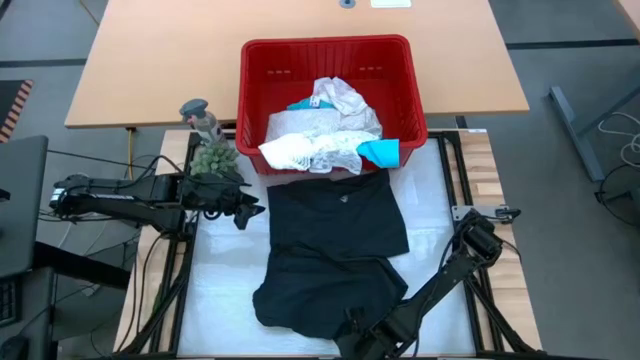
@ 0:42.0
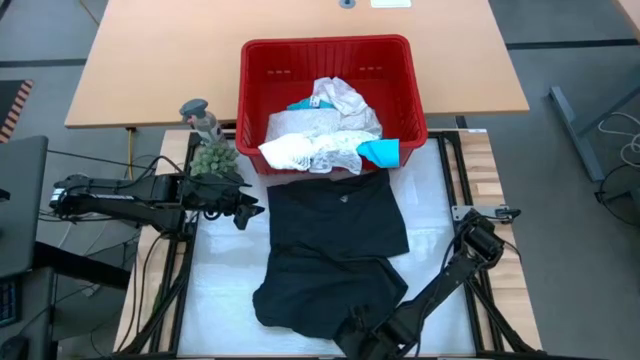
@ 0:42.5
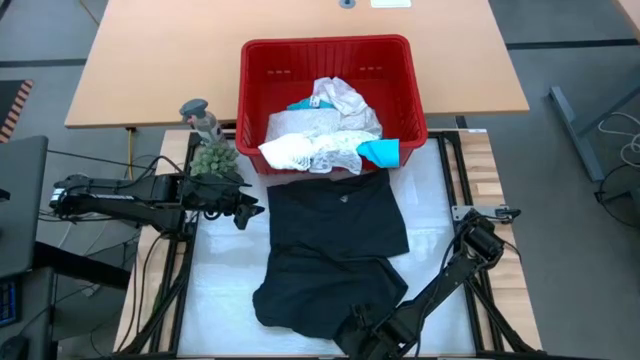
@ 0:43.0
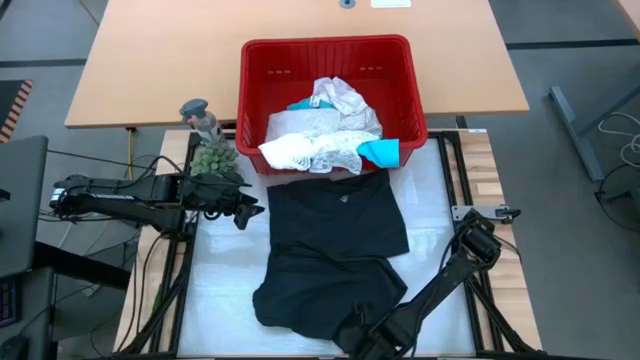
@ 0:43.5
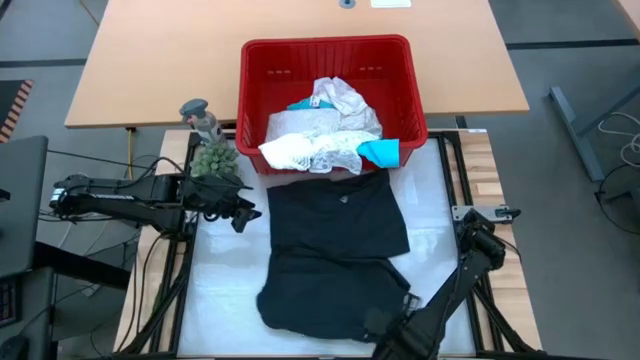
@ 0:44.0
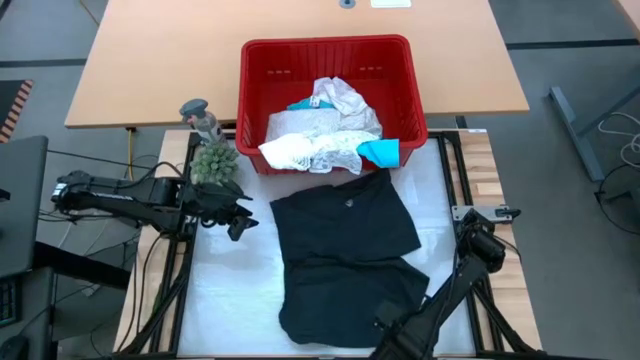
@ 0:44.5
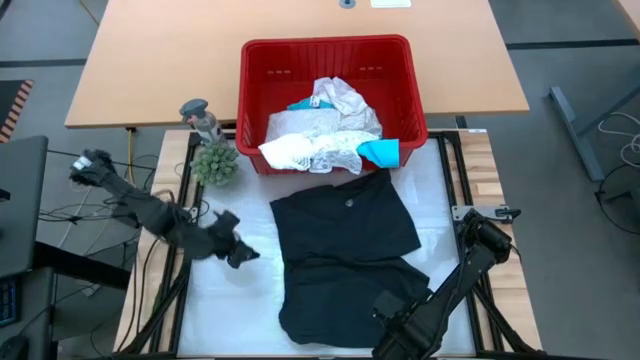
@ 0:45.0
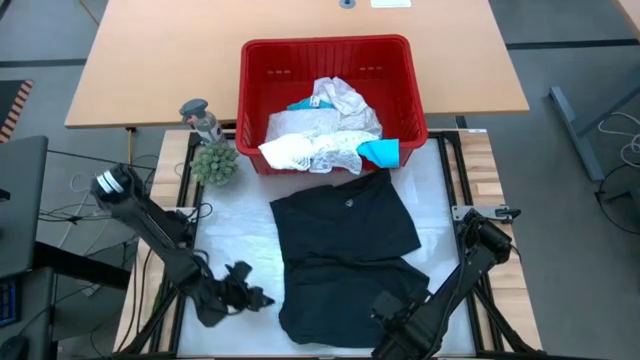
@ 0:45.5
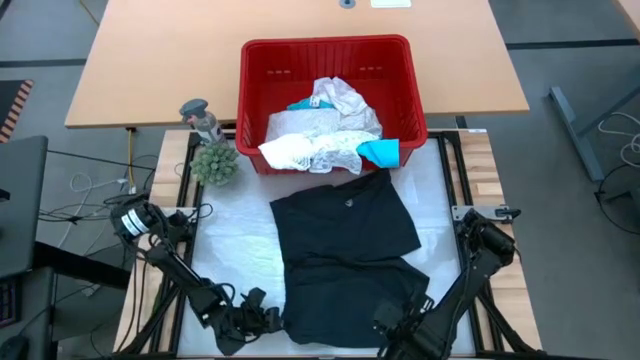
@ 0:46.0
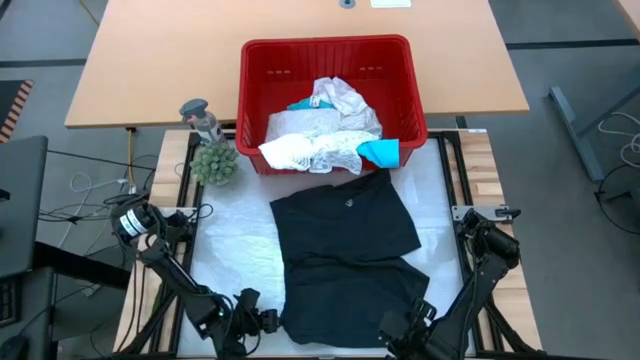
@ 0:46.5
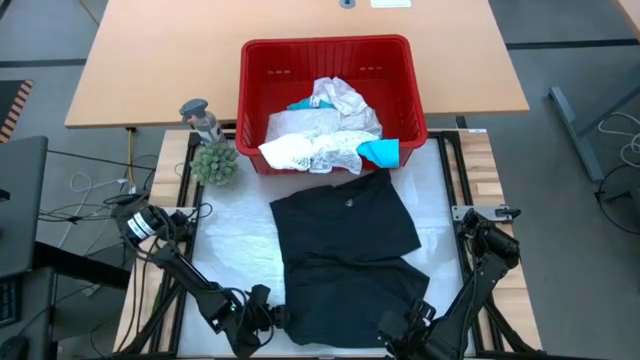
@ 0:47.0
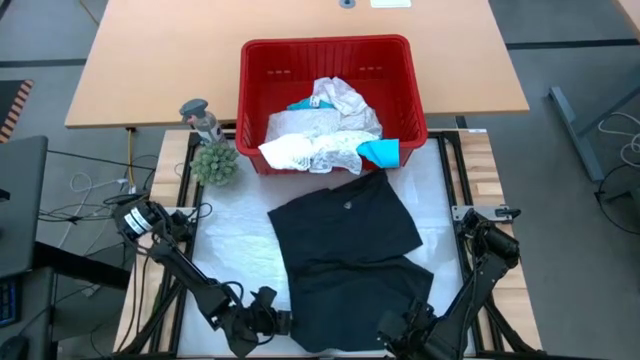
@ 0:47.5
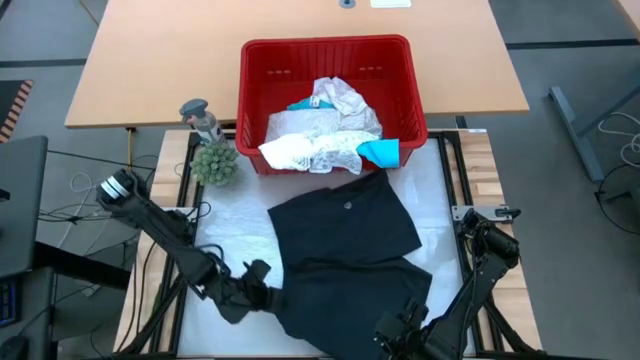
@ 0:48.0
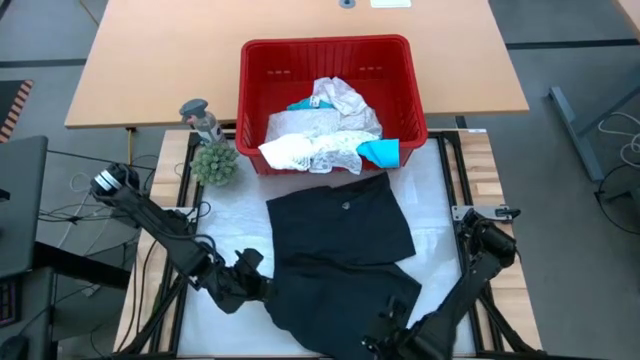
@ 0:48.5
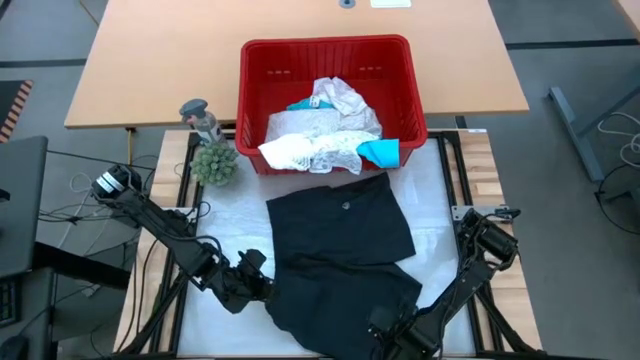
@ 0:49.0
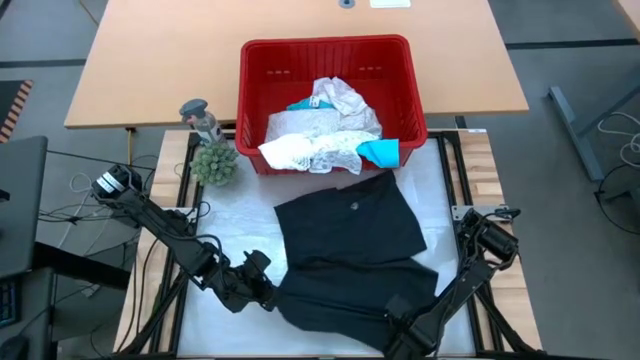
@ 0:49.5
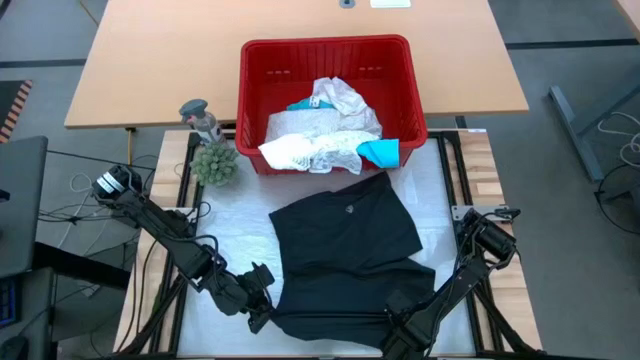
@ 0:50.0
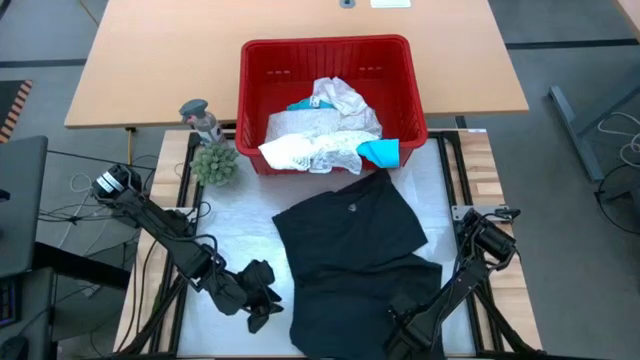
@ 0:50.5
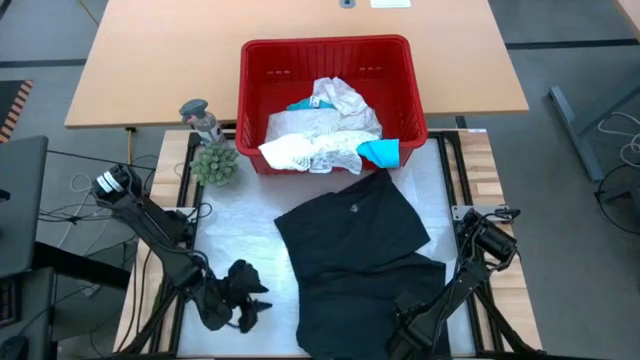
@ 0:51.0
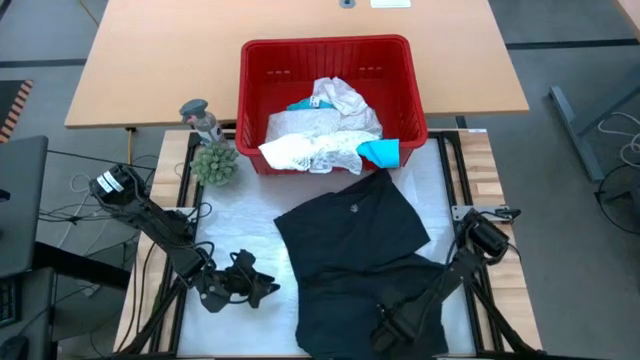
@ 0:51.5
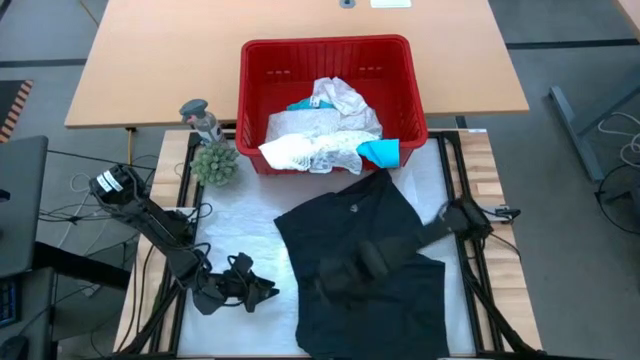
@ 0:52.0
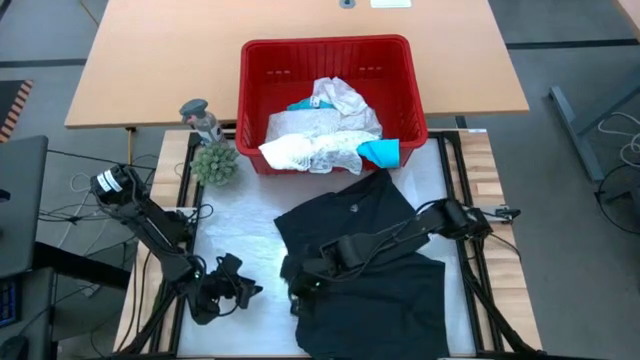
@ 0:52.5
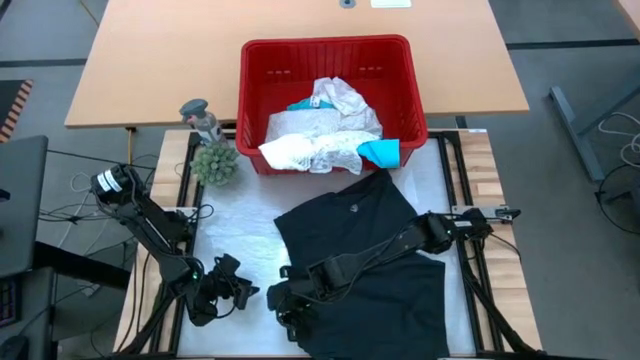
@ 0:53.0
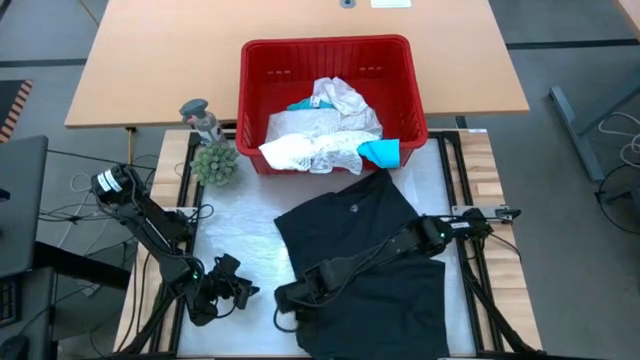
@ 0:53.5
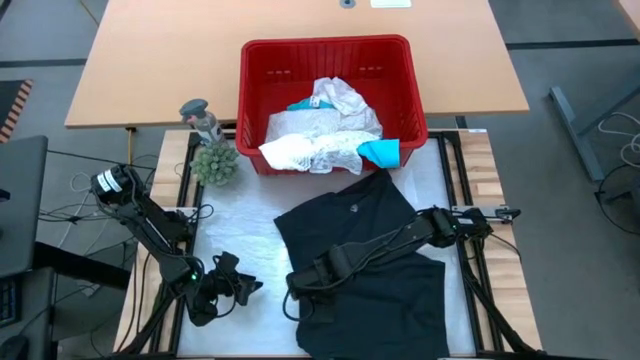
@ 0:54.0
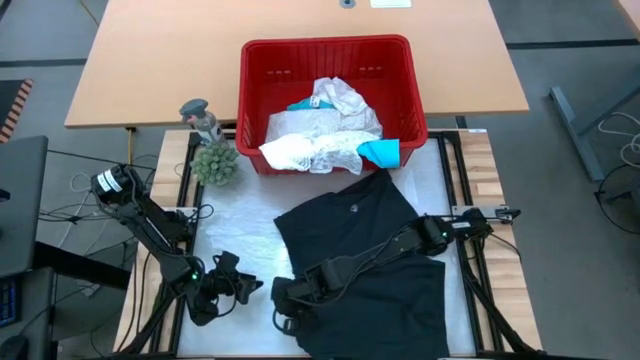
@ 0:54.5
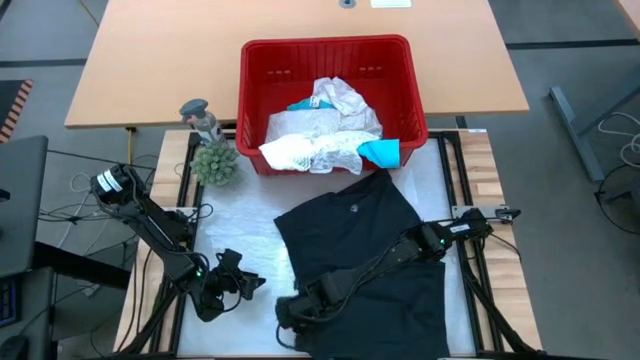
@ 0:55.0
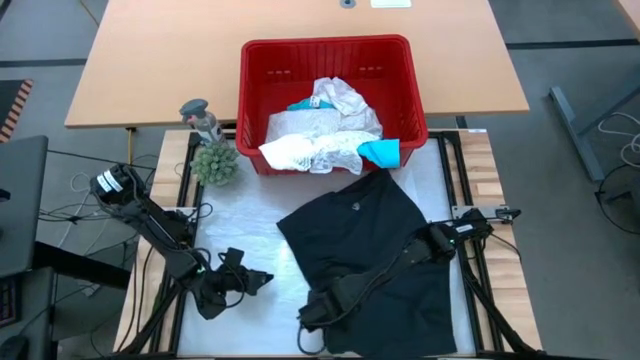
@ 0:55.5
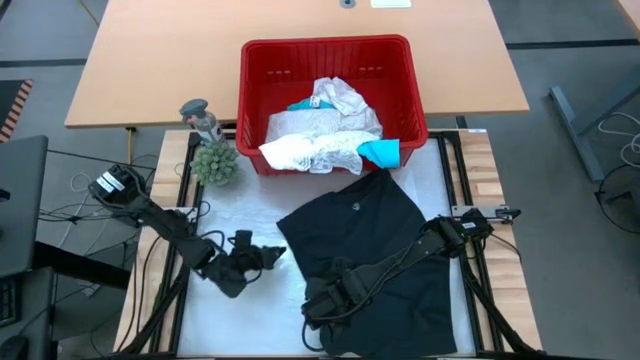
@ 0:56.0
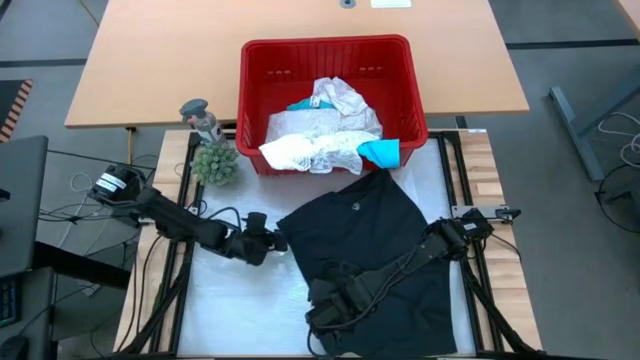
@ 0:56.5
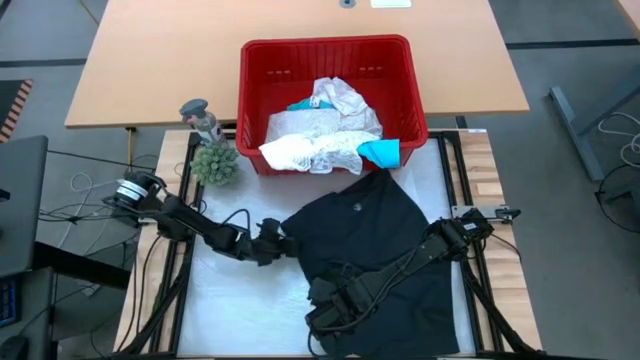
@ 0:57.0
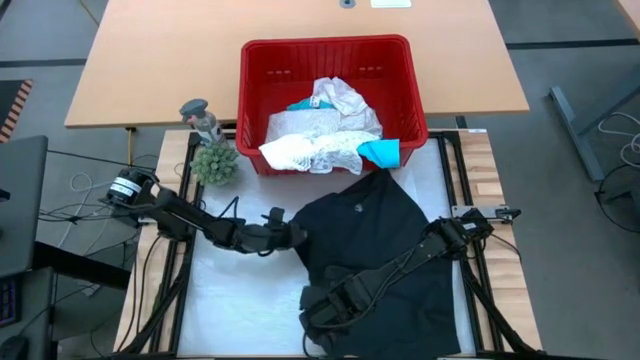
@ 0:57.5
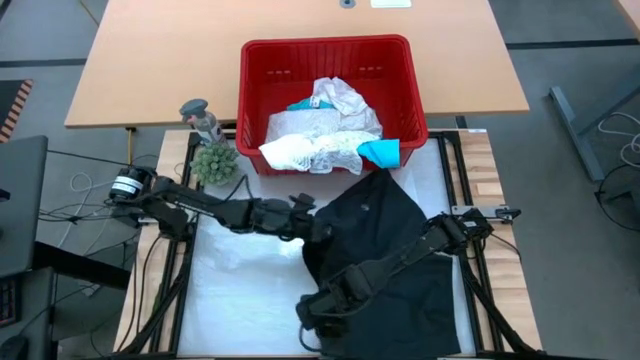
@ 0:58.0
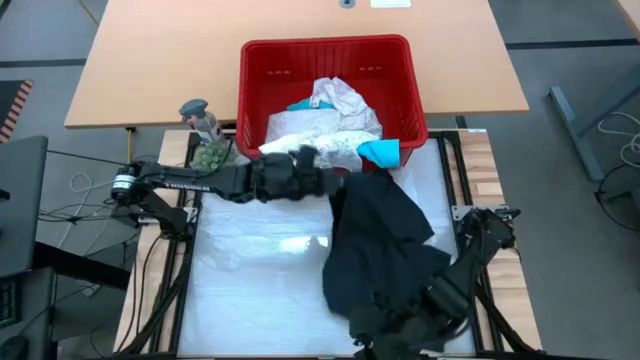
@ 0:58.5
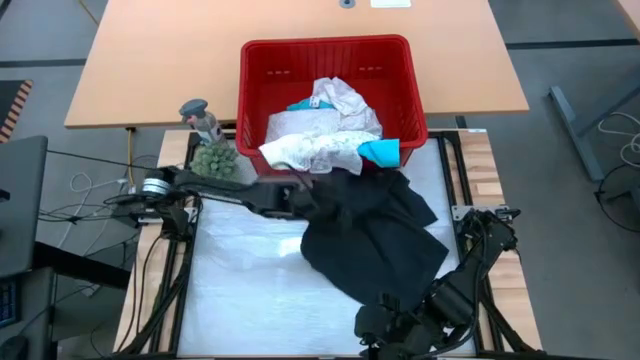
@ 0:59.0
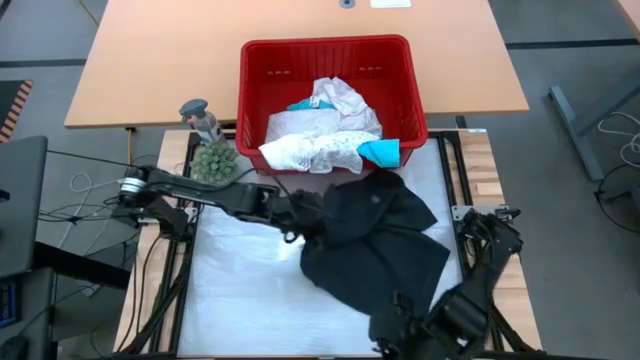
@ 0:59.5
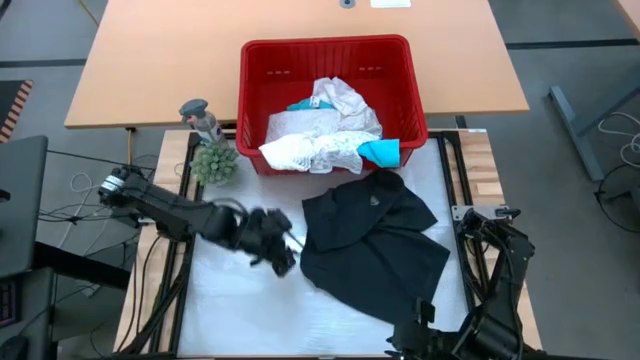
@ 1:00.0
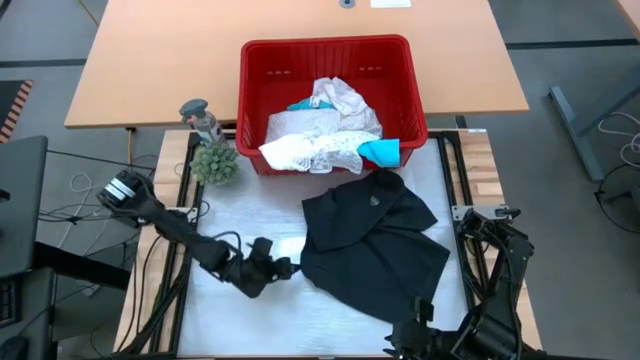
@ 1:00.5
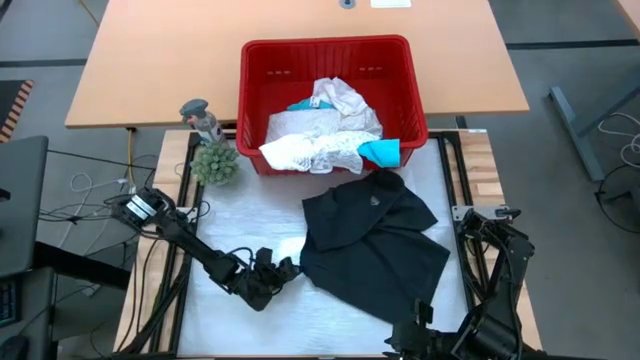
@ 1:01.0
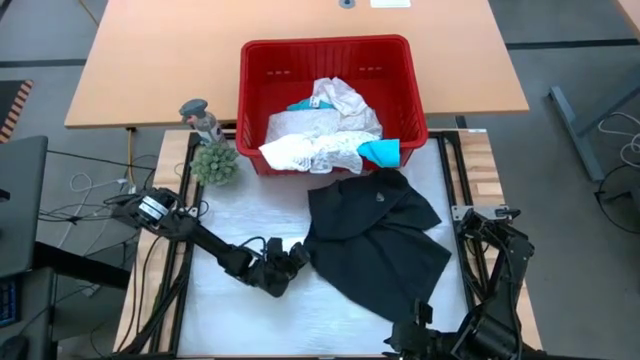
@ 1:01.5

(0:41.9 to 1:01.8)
Task: Fold Laundry from Bin
Fold the black shorts
